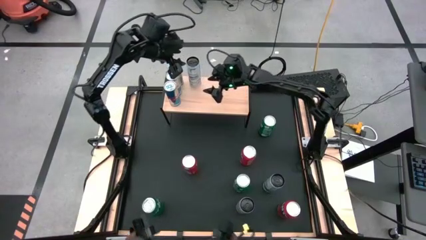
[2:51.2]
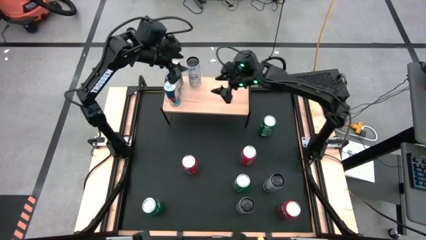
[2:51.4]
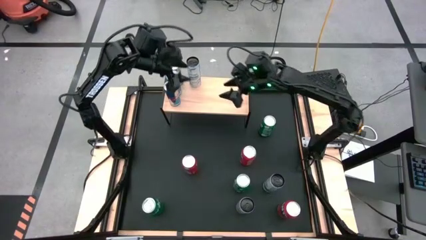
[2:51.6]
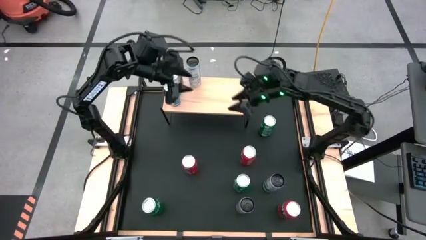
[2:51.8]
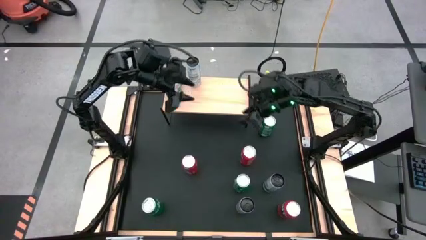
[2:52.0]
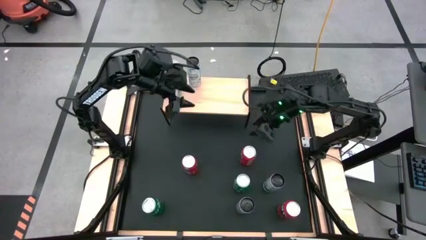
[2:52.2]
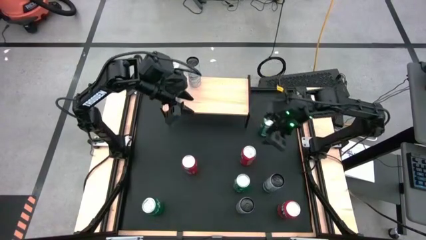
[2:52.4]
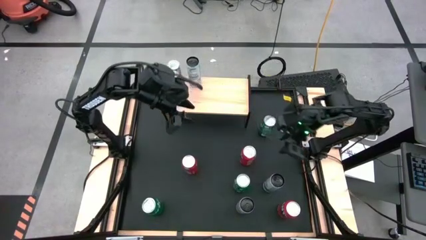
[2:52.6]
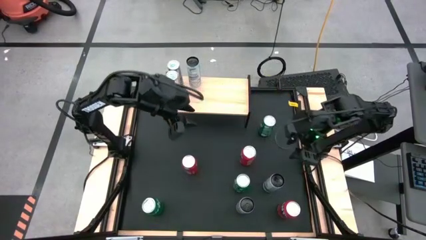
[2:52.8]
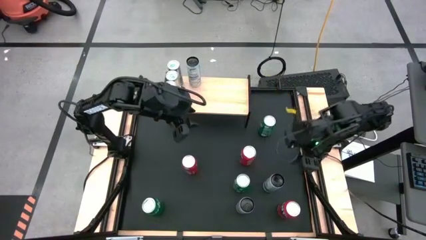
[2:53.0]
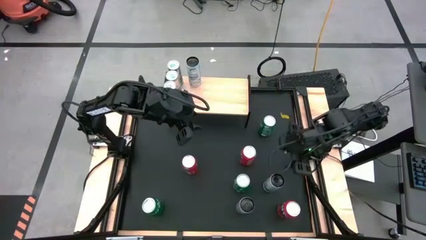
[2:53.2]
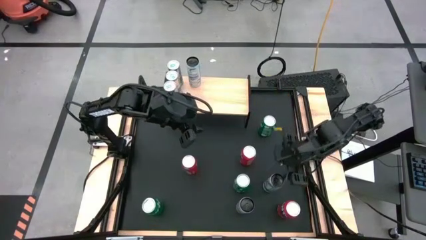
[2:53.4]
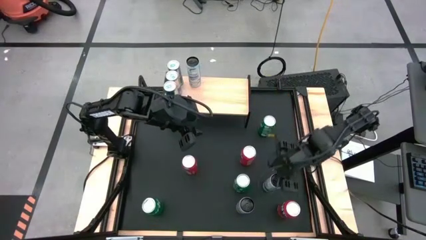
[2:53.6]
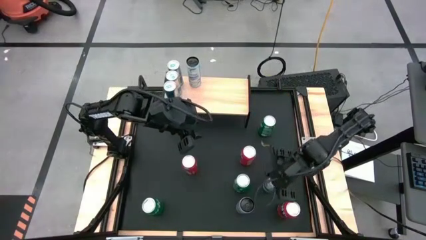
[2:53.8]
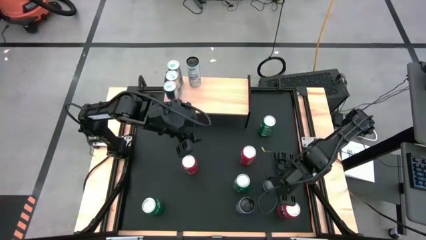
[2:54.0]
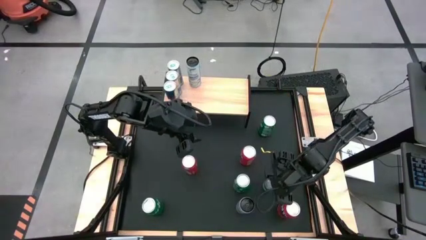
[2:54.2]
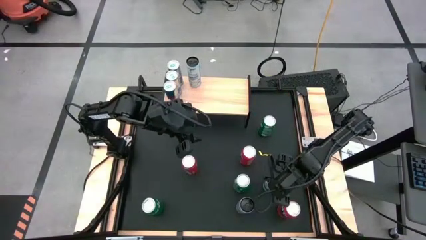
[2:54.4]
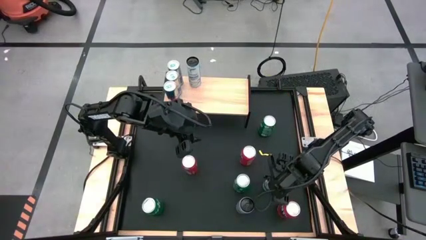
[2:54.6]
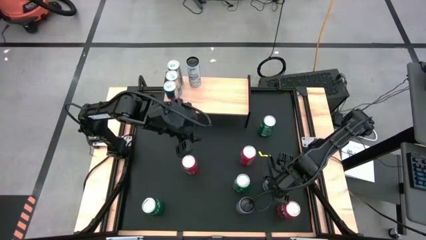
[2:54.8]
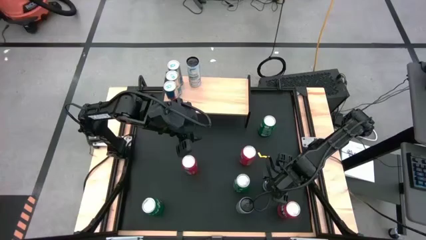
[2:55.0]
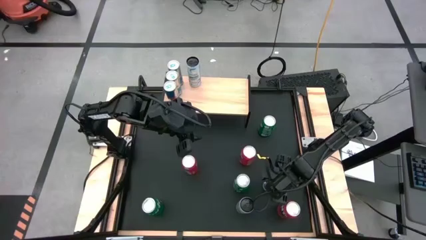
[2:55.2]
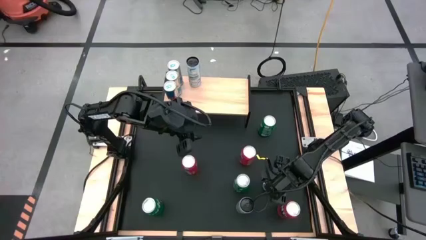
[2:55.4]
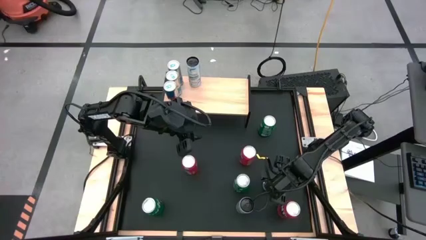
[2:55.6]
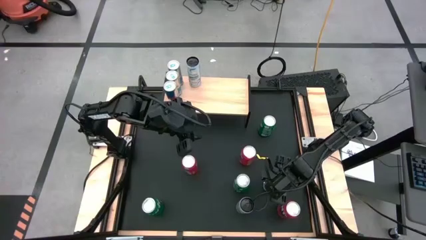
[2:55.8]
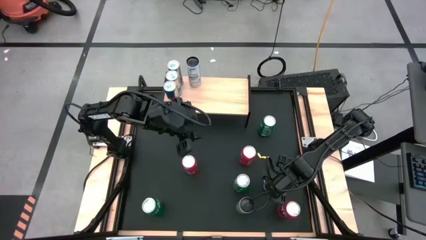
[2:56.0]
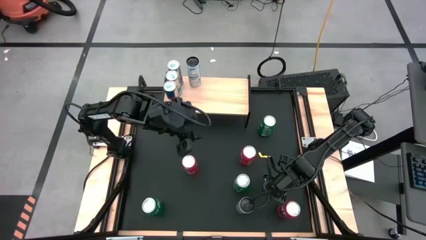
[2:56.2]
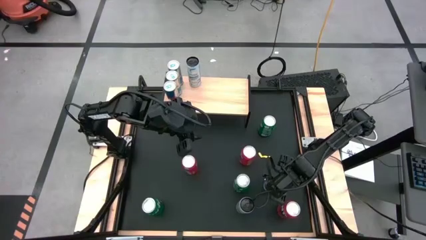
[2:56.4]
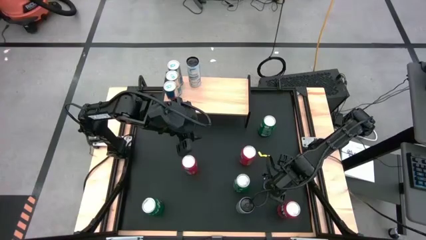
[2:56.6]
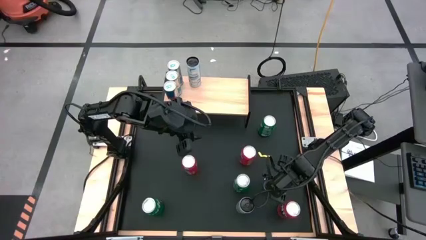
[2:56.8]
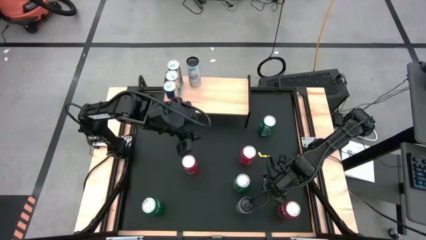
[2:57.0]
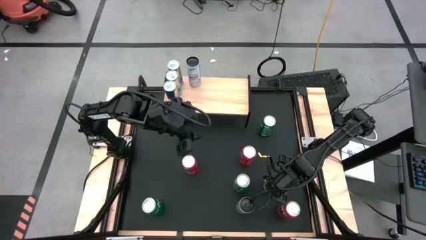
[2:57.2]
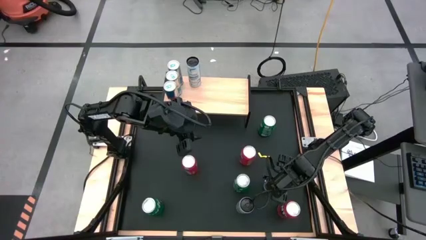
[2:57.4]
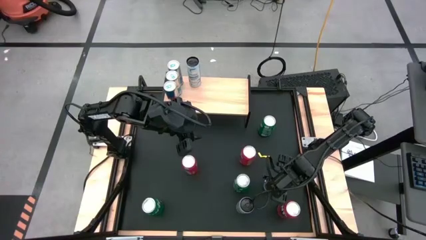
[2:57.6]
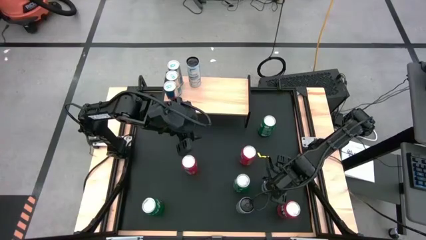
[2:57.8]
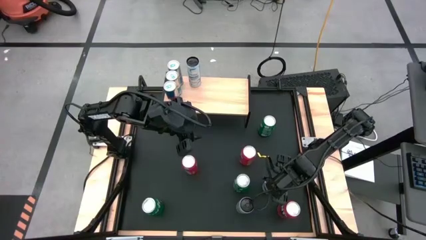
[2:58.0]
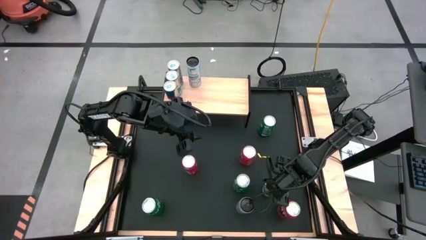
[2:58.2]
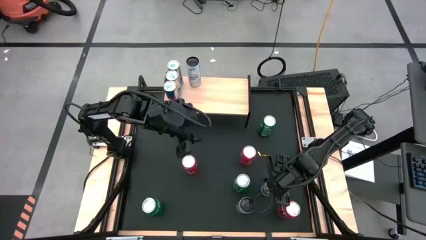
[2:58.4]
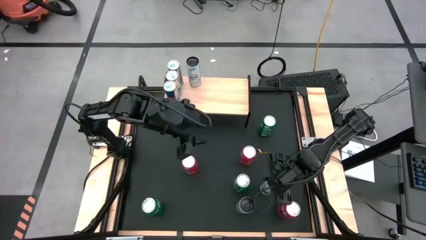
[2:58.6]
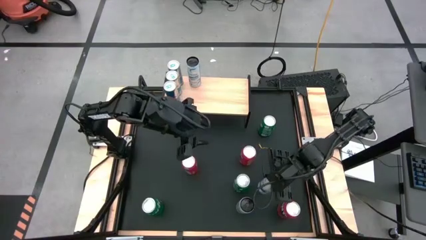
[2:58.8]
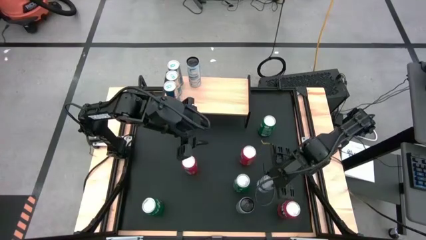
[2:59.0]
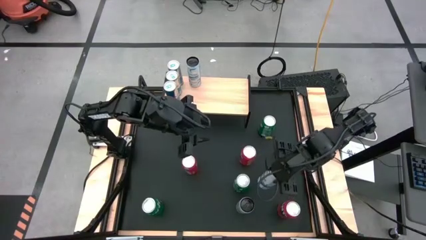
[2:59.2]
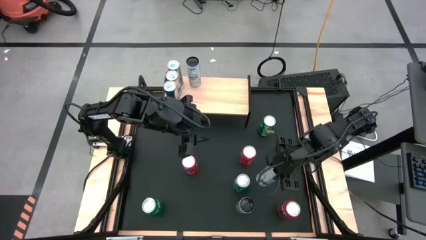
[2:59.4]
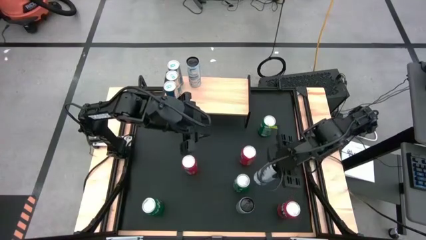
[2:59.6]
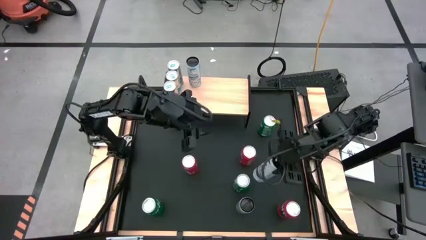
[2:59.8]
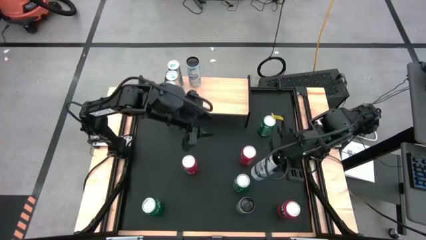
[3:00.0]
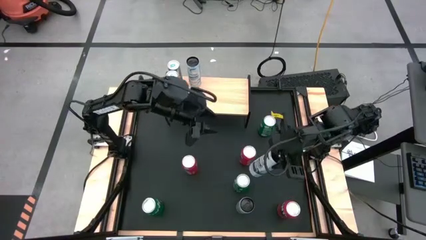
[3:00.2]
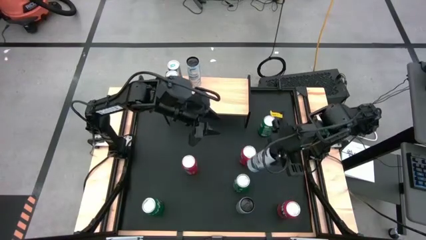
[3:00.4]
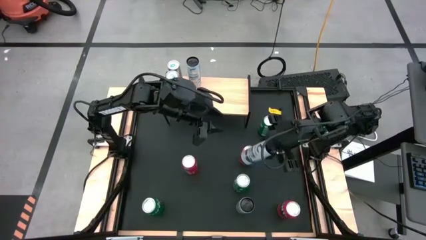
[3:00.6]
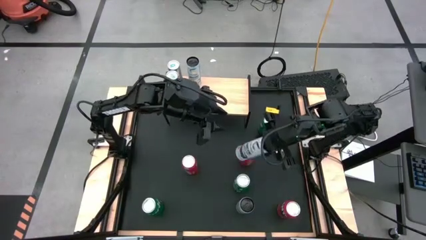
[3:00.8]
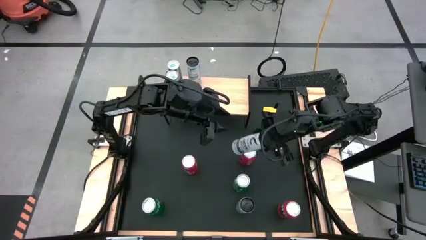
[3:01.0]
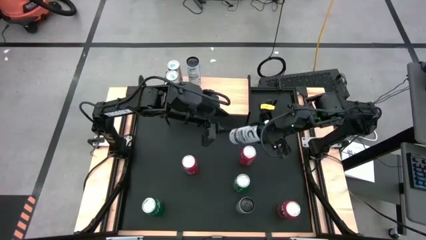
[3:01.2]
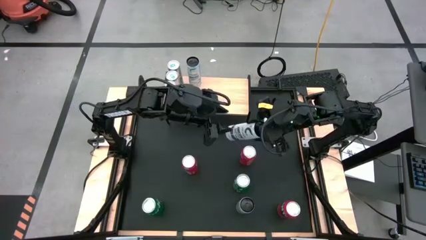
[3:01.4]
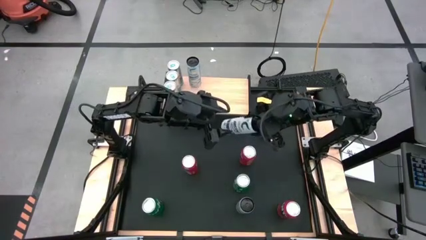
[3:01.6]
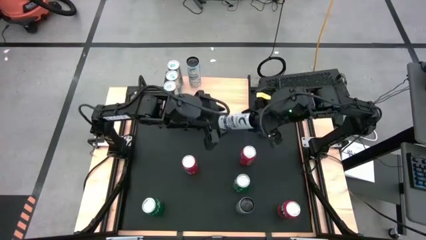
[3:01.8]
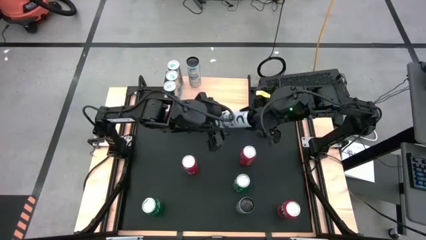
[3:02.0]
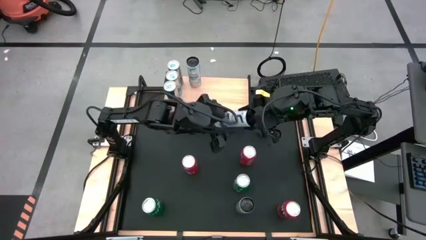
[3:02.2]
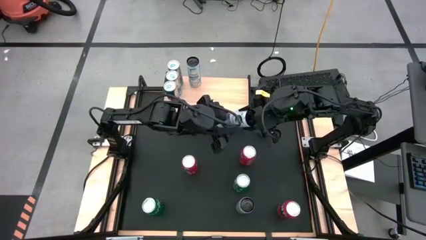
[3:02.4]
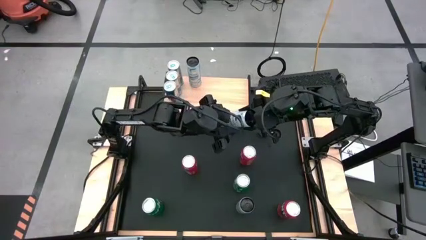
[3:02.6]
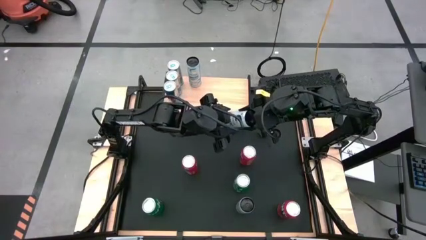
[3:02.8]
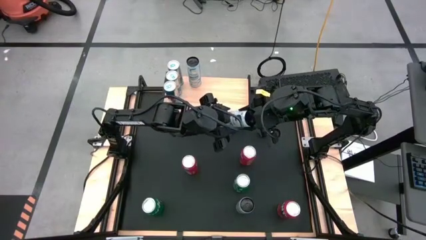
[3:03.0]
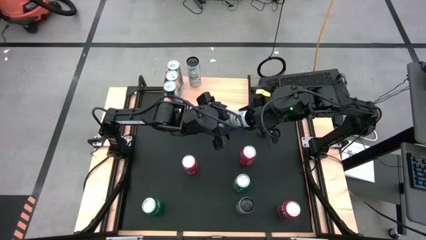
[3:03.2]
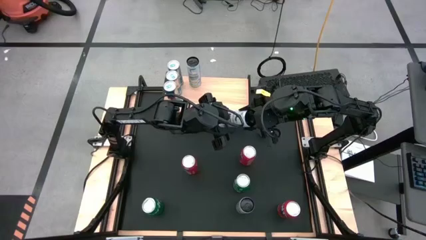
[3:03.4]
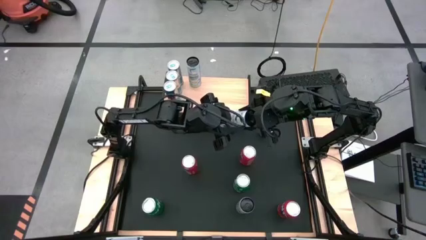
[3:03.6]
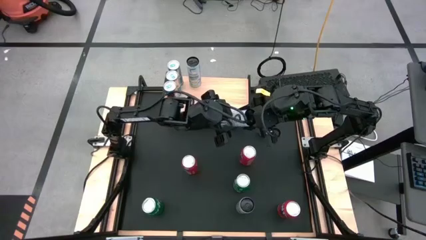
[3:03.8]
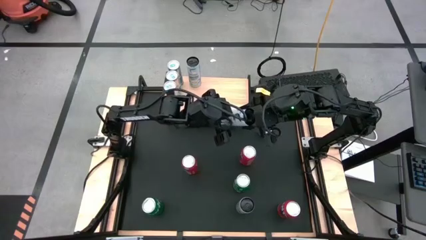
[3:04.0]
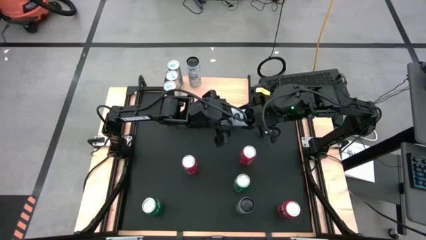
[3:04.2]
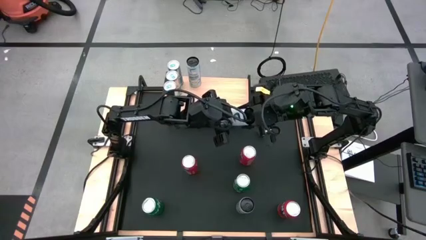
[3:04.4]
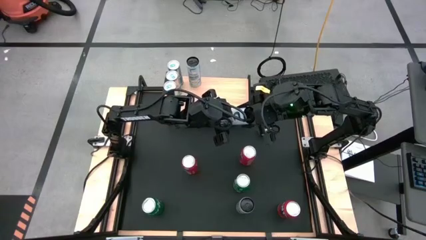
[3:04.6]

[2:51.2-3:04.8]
Task: Place canned beverage on shelf
Put the top white-blue soda can on the shelf

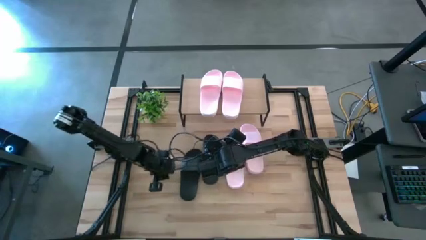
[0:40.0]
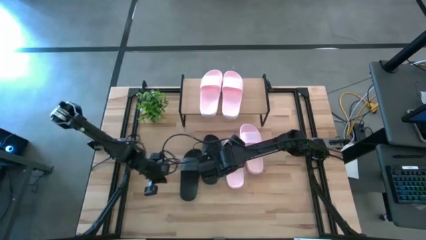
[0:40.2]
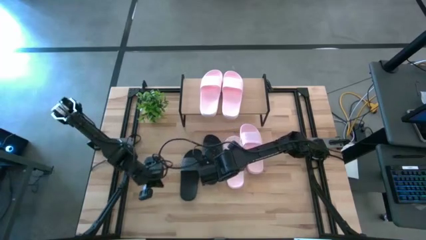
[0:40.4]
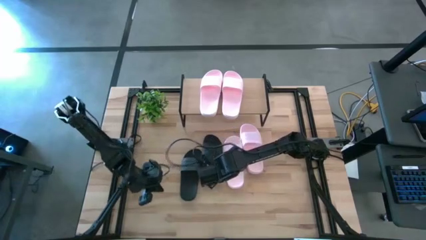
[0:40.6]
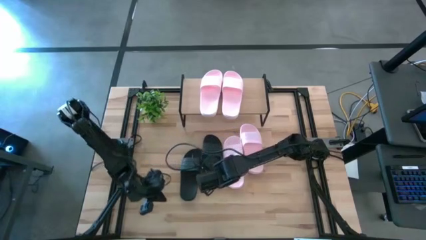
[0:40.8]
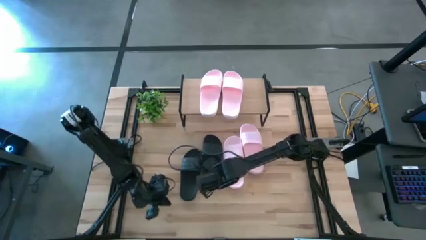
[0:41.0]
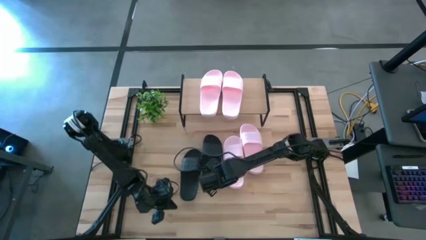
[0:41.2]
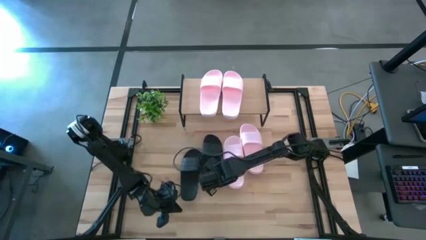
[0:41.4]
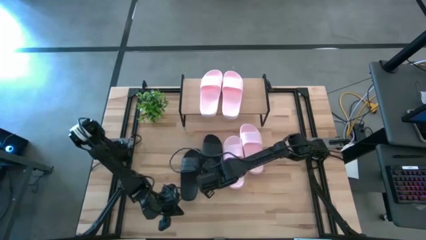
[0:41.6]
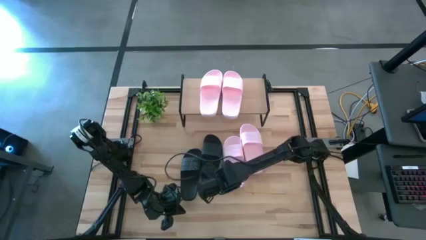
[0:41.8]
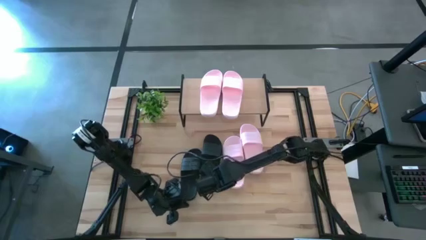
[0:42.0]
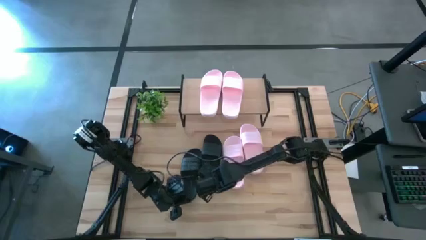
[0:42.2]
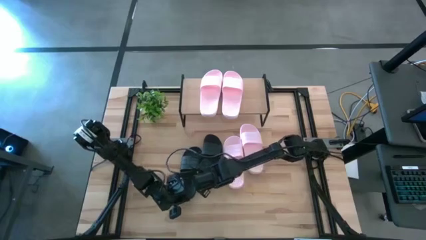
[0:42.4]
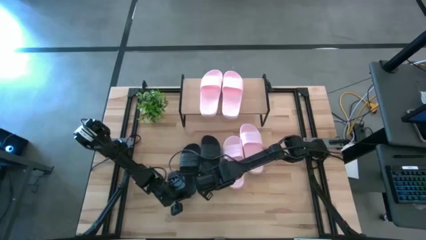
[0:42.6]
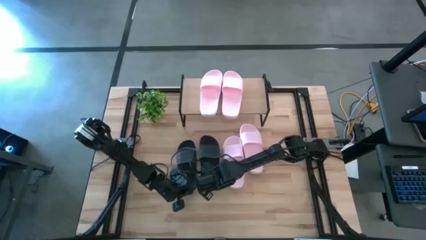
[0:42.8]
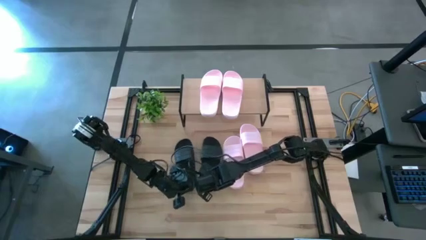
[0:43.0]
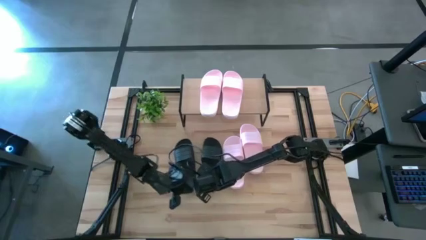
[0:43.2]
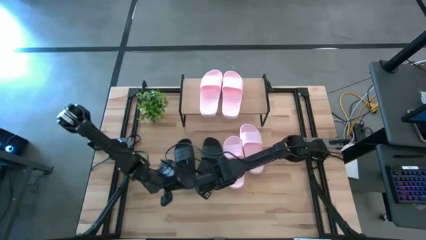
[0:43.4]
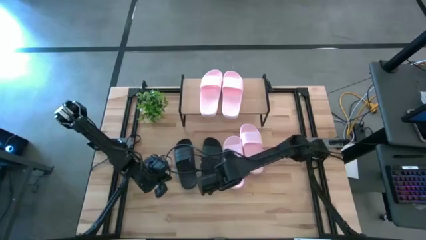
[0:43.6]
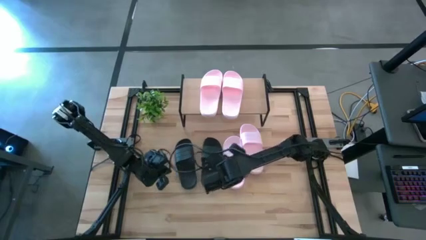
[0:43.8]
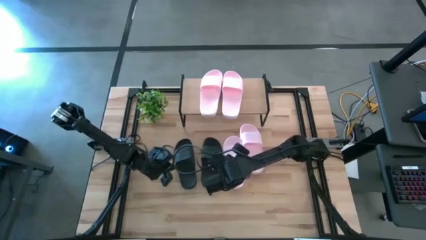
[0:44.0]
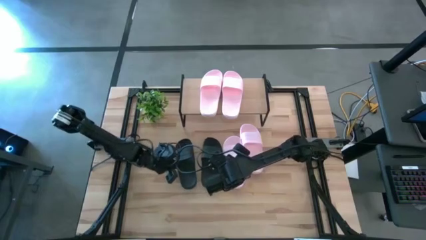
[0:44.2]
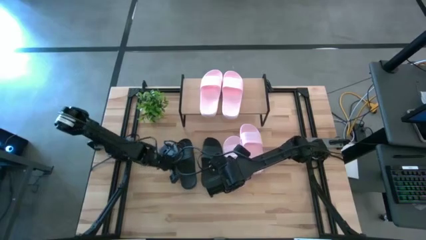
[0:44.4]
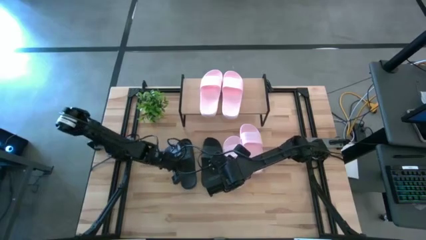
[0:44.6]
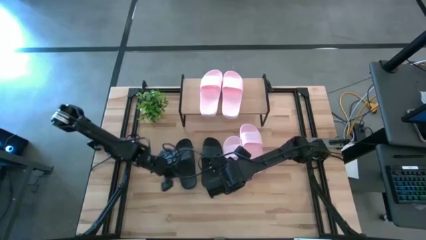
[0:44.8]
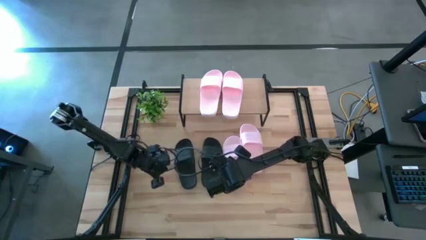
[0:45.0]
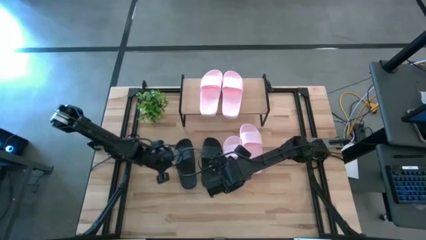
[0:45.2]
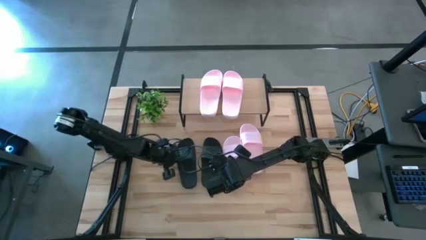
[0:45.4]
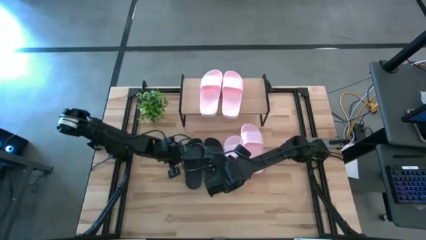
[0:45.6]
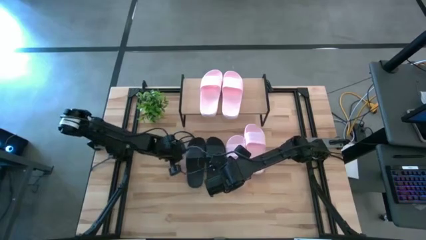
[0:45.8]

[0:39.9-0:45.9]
Task: Pick and place slides into the shelf
Adjust the black slides to the middle left of the table
